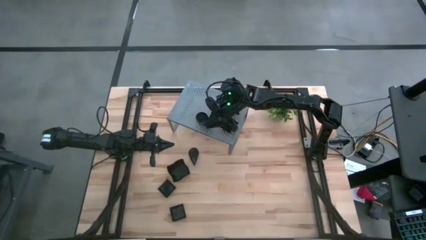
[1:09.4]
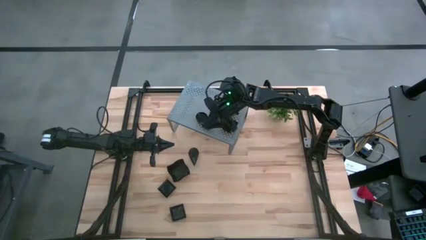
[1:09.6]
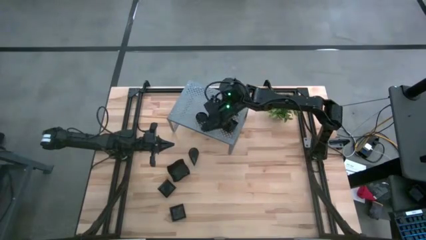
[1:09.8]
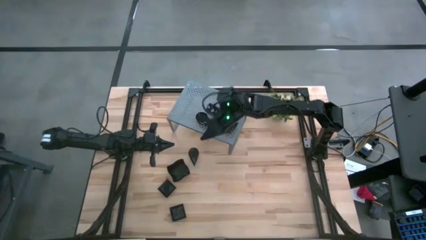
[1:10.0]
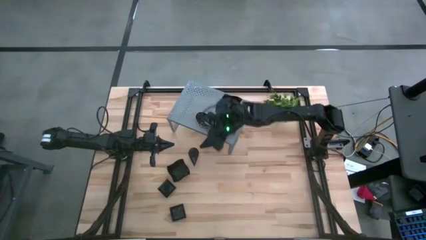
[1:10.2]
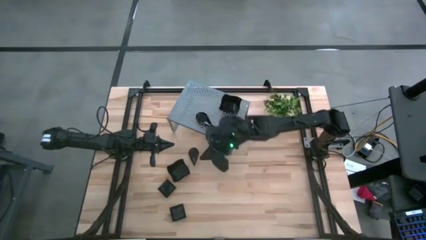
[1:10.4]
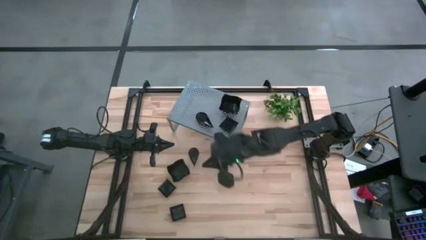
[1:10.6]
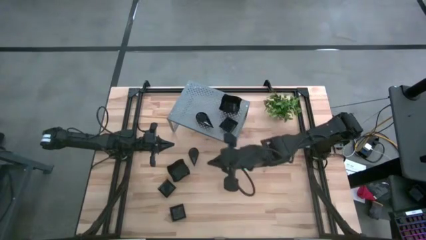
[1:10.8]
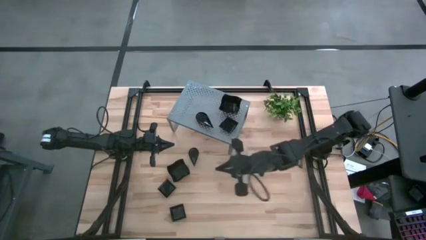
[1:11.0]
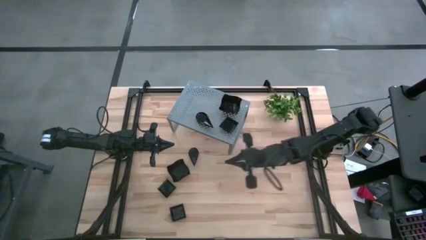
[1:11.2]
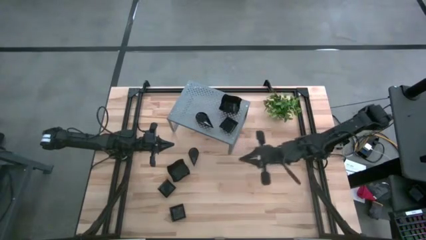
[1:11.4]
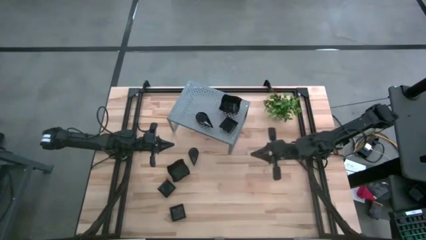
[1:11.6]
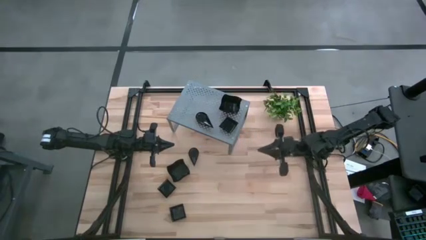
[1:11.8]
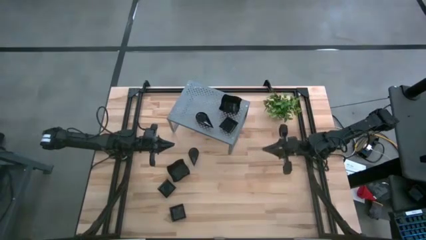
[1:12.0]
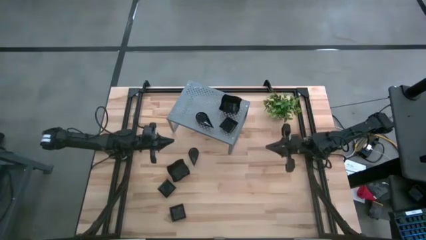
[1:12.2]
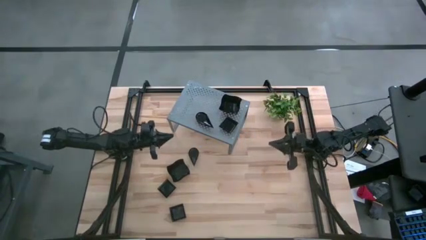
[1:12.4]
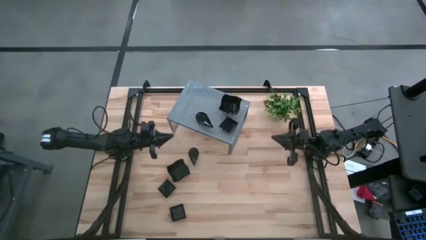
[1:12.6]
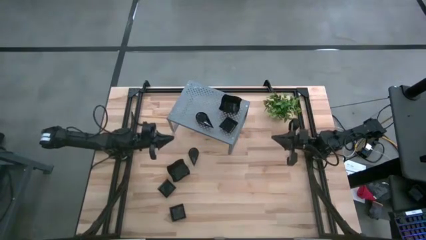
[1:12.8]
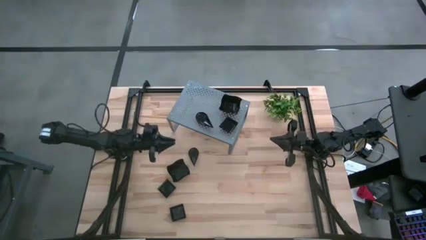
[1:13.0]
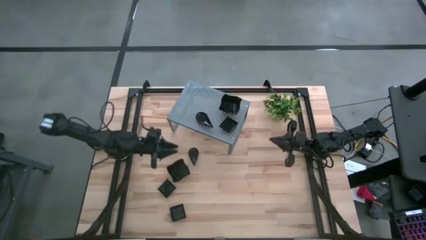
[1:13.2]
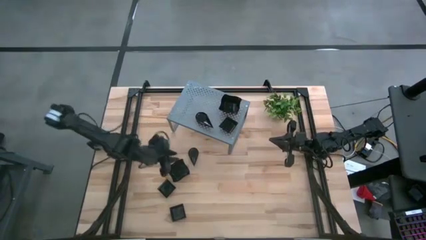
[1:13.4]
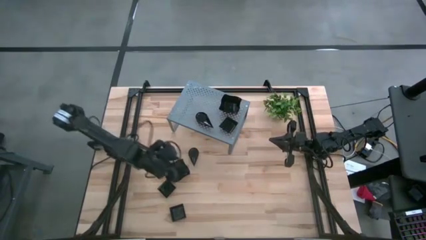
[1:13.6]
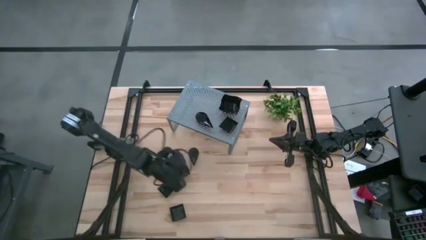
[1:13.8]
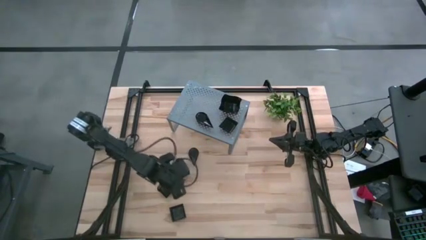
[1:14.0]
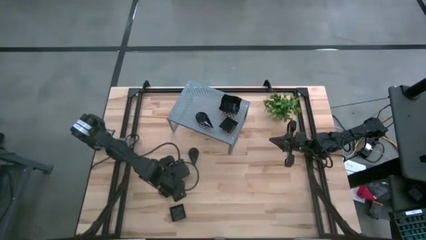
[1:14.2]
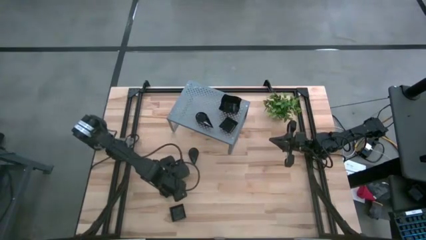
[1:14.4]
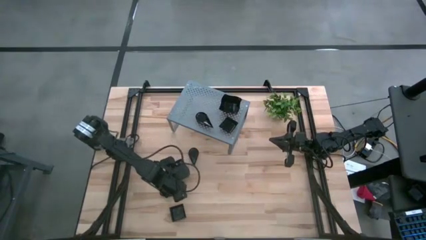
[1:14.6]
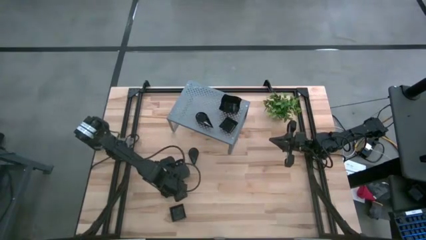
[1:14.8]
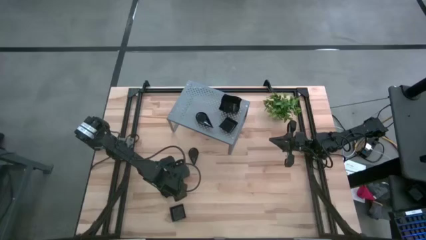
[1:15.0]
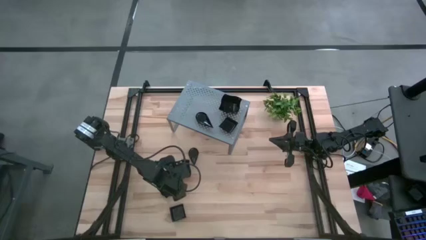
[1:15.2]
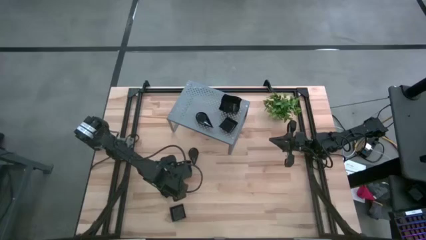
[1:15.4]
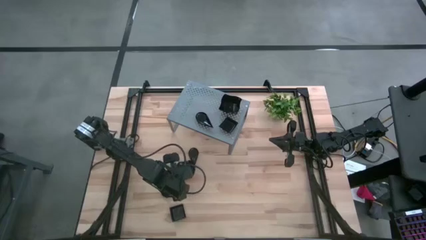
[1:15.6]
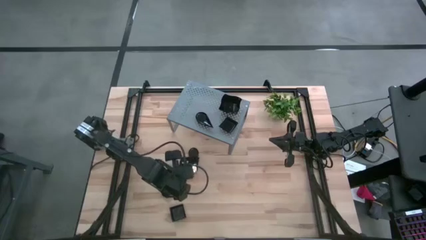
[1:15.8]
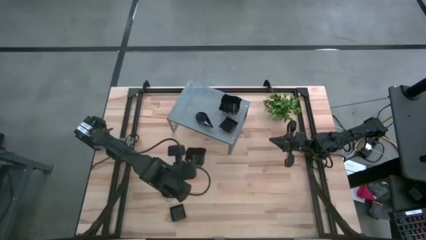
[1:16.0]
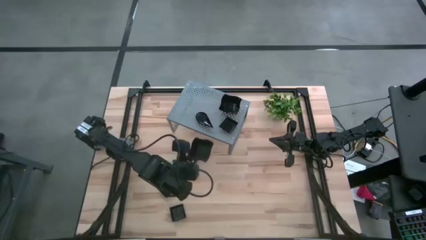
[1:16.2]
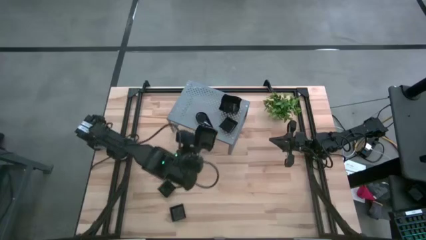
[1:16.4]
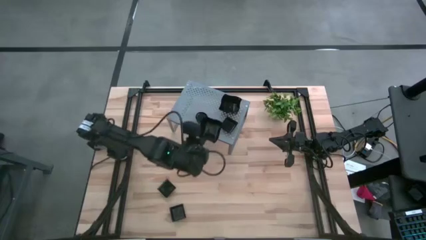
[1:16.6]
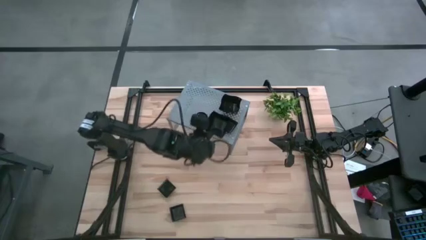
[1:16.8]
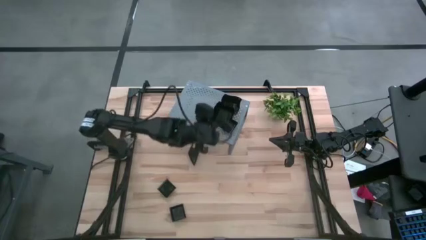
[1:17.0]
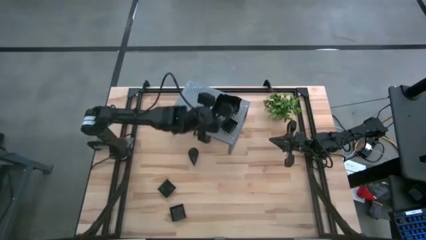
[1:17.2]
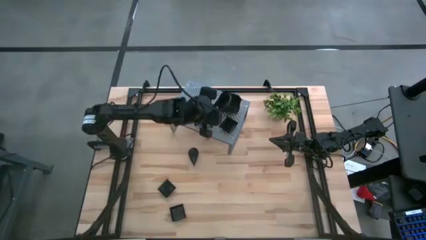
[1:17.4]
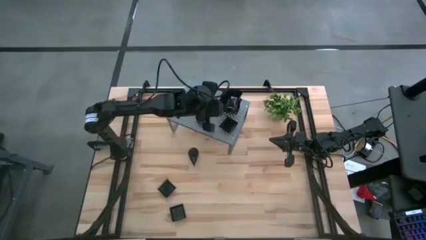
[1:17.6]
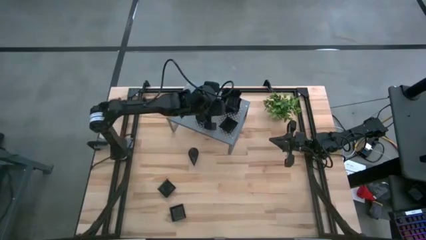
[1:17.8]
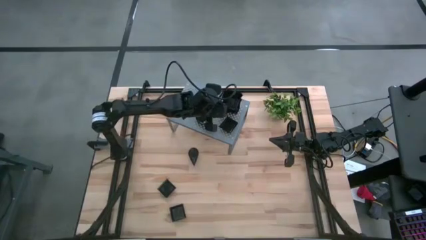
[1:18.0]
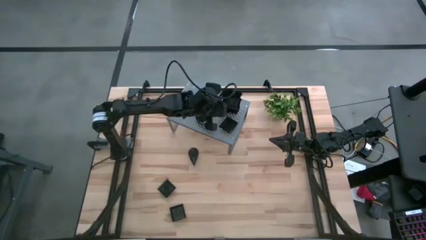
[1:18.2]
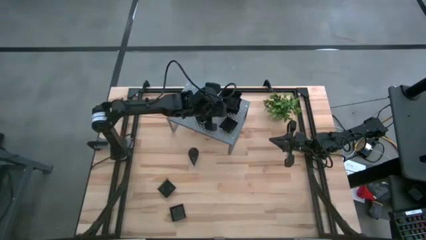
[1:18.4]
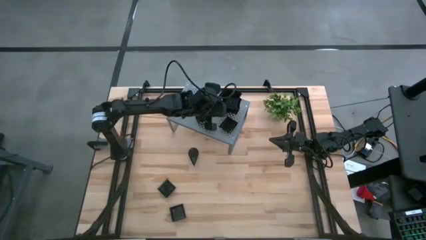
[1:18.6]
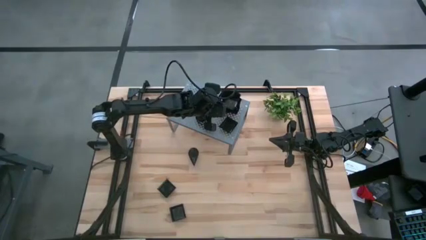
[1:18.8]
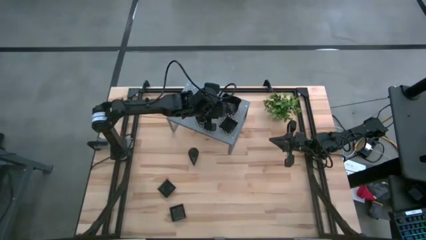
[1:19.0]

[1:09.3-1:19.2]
Task: Pick & Place Mini shaped plates
Stack the distorted square plate into the distorted square plate on the shelf

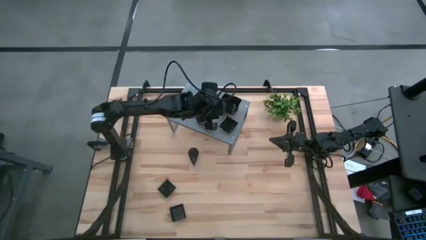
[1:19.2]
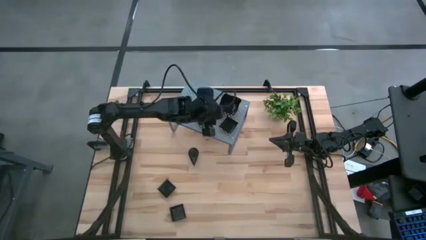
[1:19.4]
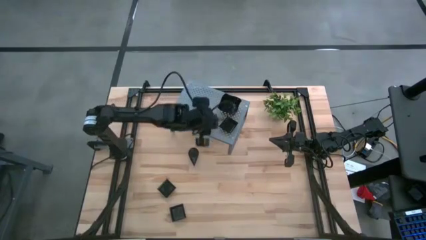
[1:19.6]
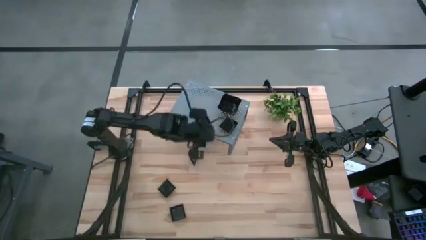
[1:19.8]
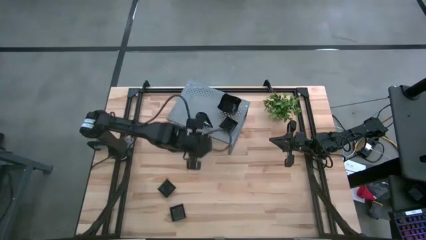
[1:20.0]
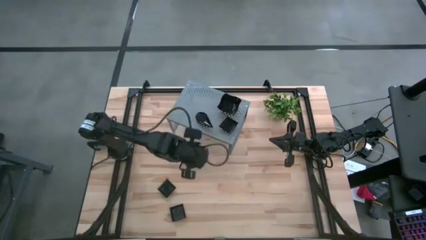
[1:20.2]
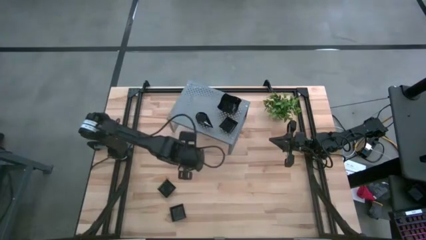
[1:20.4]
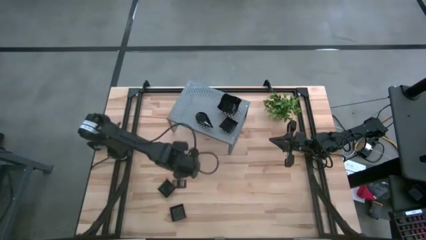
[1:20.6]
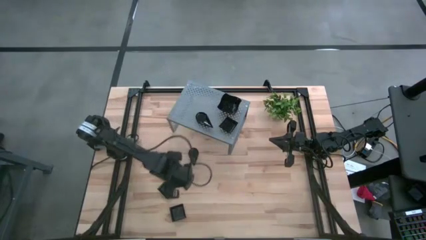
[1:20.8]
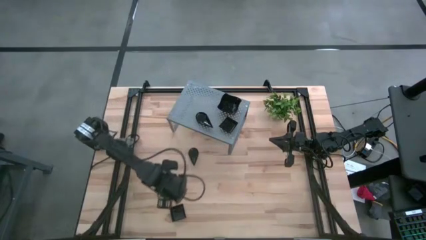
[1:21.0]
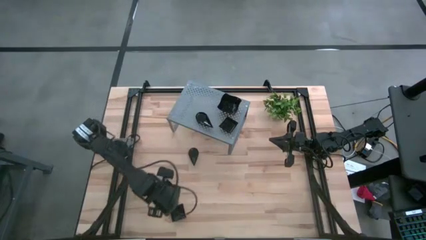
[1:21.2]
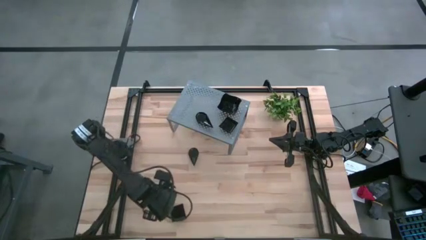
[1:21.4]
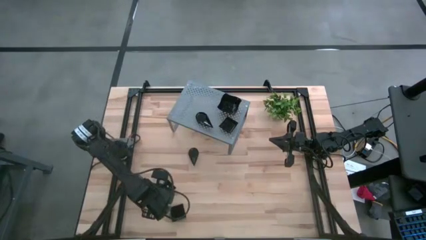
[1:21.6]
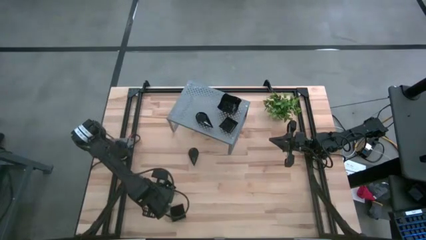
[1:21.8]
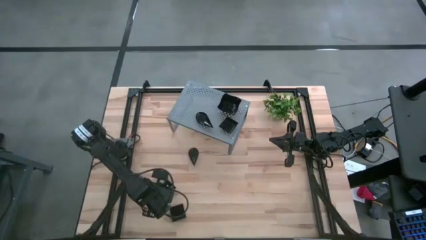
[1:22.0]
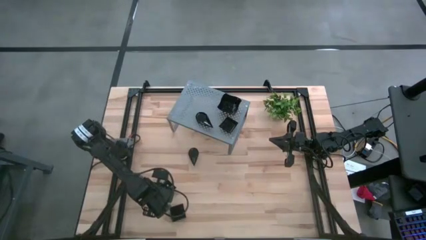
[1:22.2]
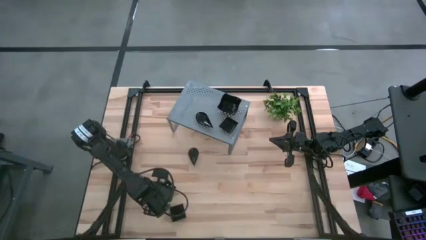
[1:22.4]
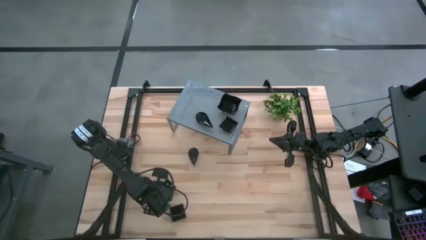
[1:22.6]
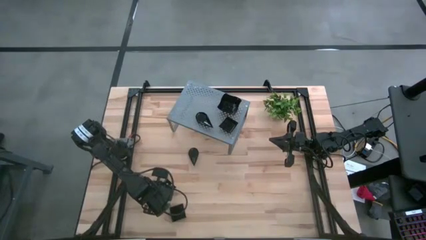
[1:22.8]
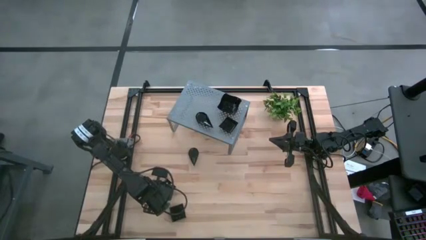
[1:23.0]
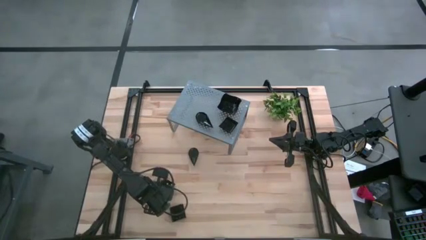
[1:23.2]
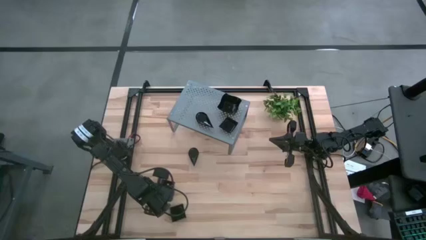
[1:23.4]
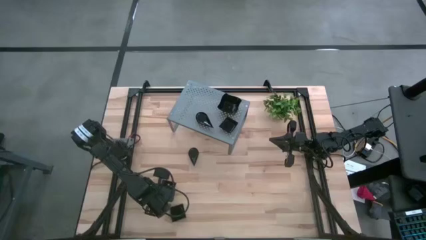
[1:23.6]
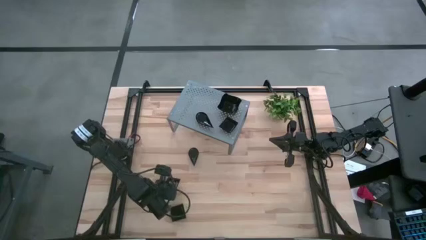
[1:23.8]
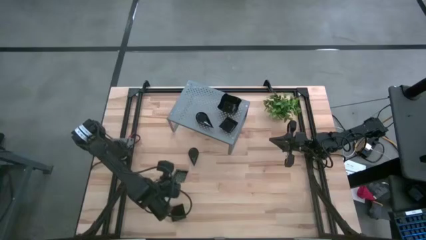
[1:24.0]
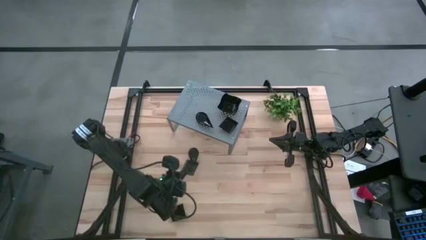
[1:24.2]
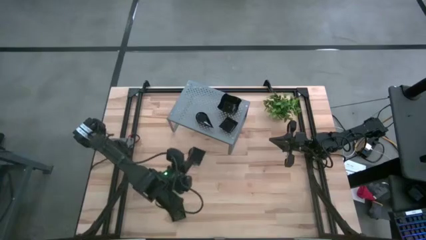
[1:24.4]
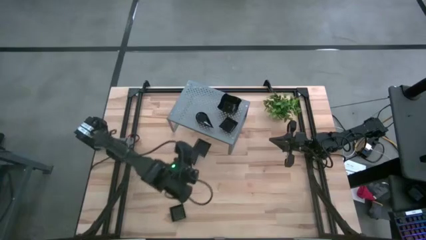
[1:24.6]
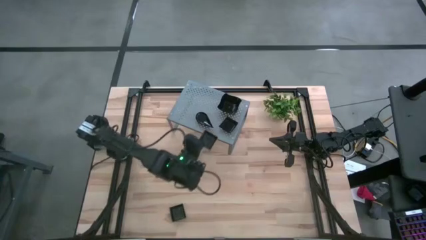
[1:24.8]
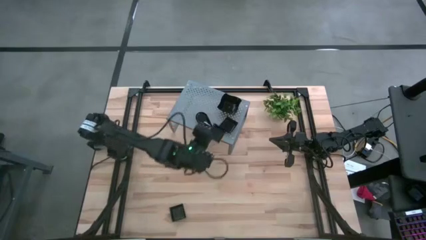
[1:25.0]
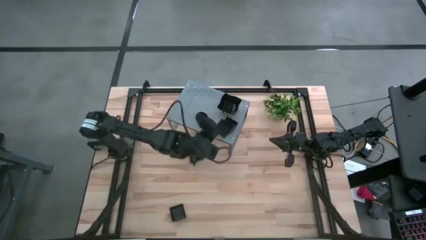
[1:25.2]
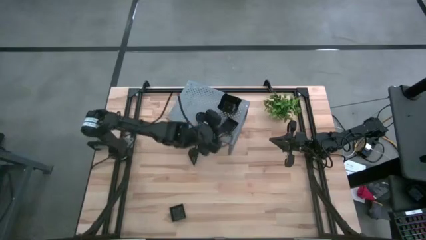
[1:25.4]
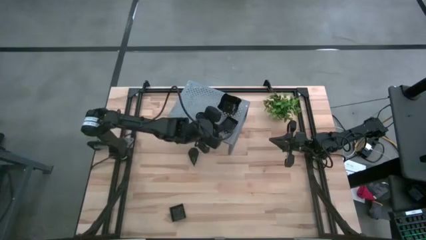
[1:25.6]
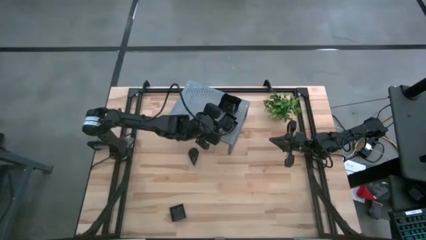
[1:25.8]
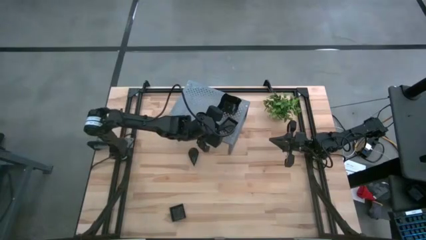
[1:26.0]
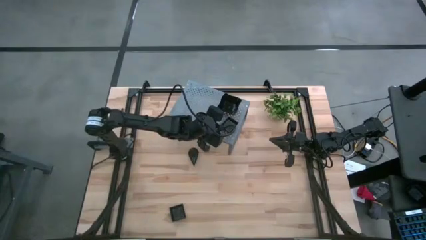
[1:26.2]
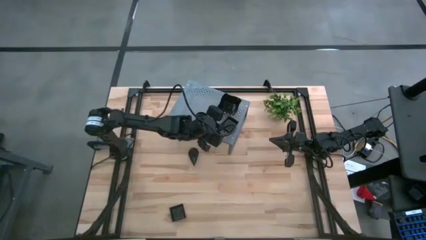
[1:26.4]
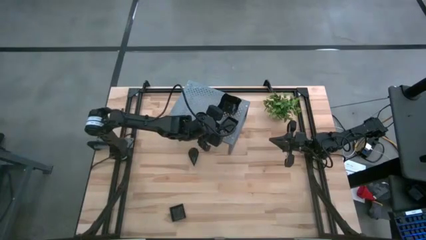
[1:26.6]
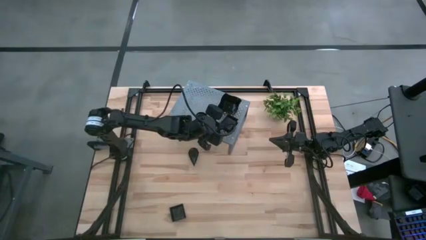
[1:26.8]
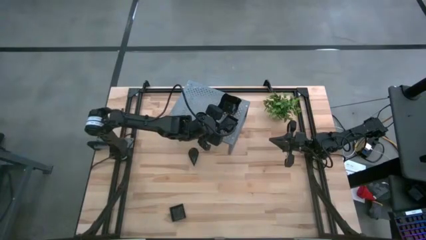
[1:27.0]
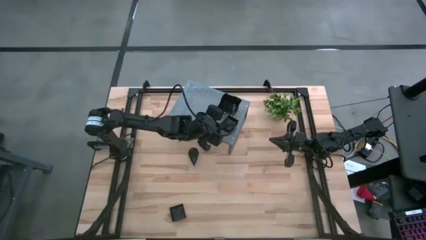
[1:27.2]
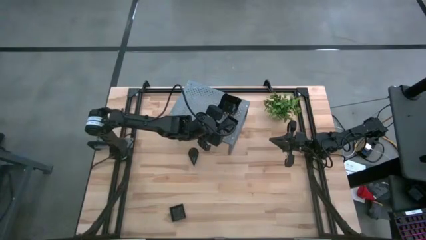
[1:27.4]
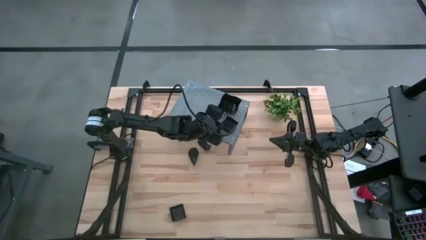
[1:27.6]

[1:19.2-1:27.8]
Stack the top square plate into the square plate on the shelf
